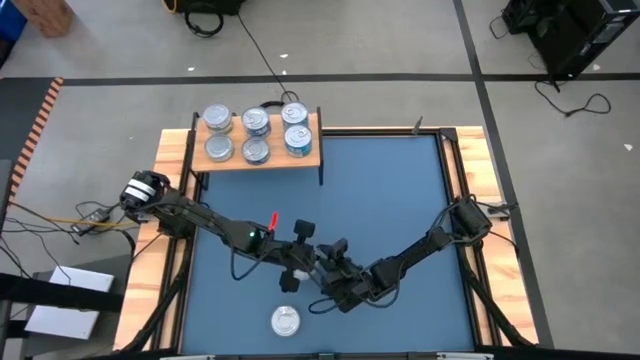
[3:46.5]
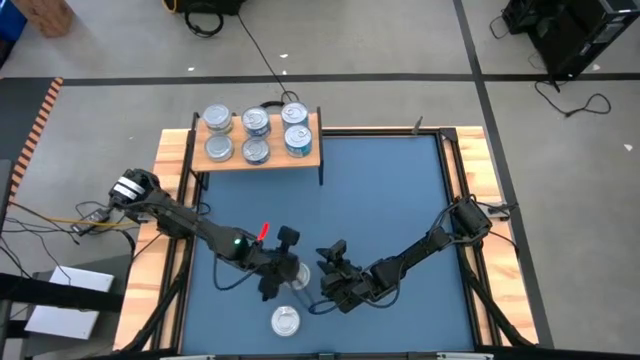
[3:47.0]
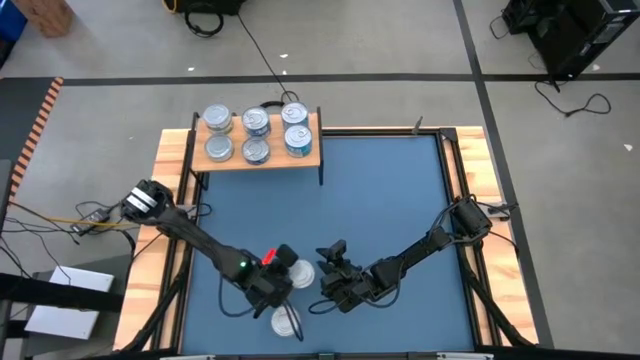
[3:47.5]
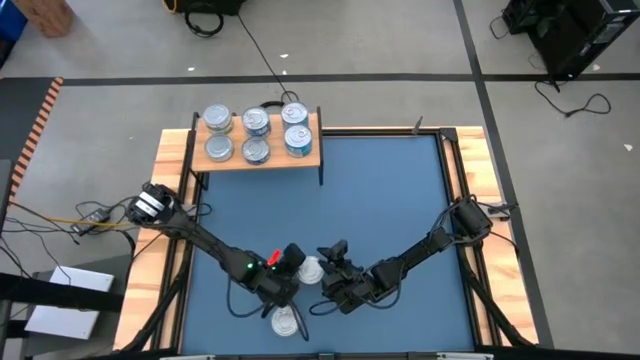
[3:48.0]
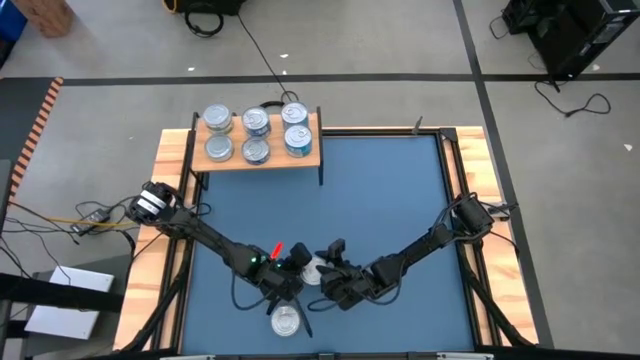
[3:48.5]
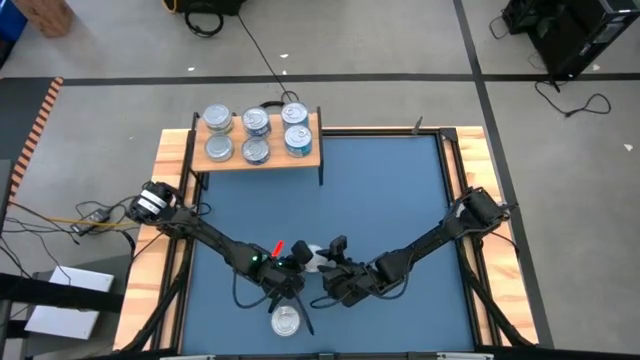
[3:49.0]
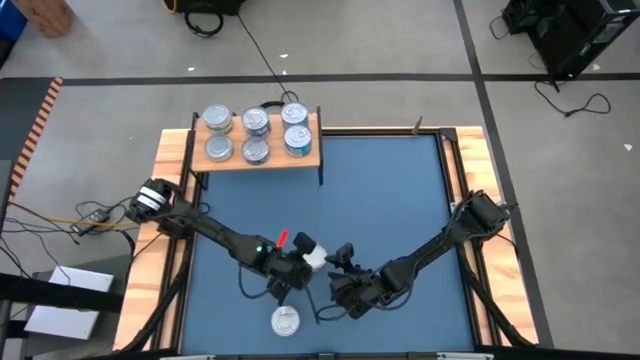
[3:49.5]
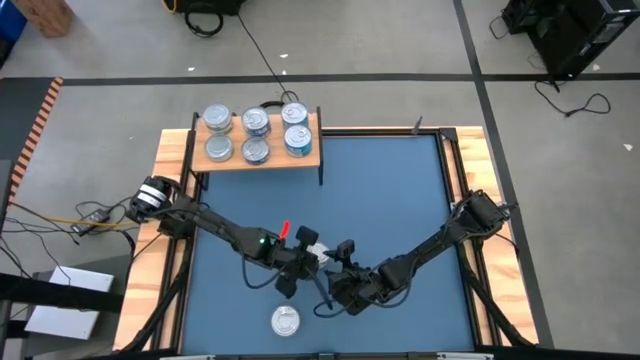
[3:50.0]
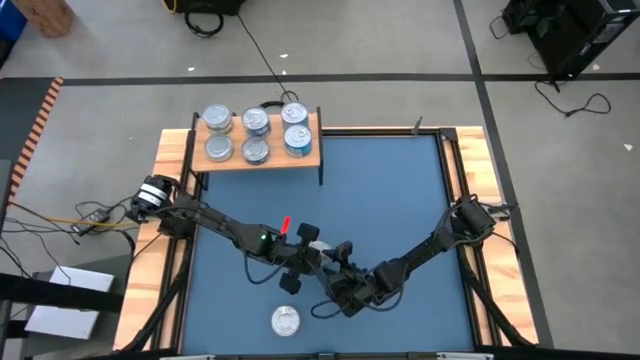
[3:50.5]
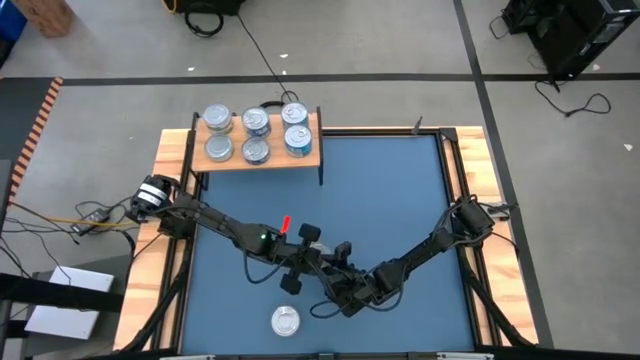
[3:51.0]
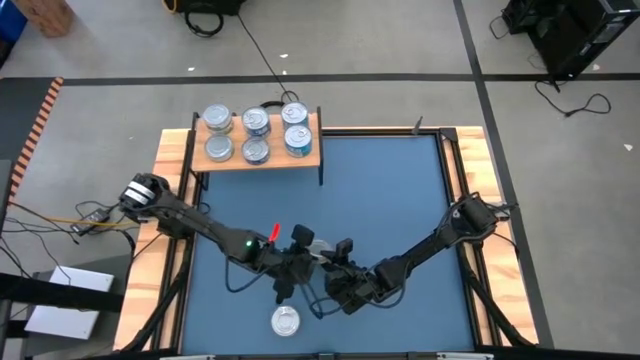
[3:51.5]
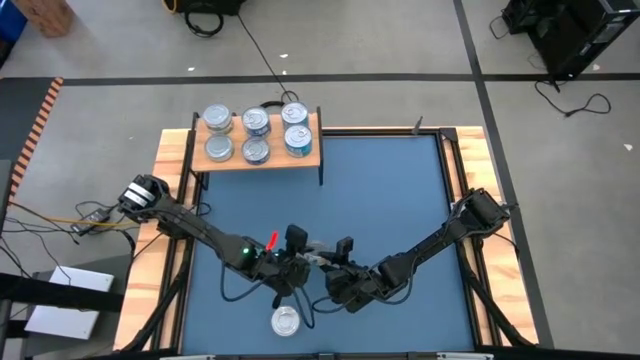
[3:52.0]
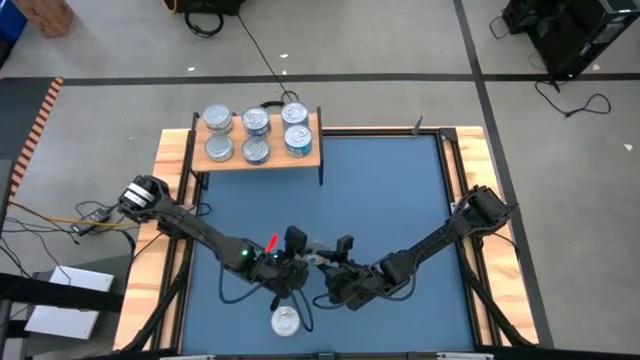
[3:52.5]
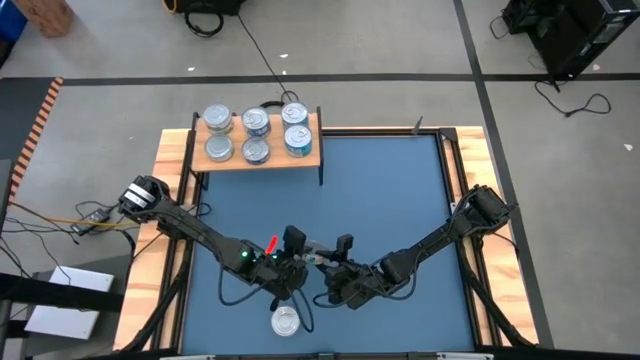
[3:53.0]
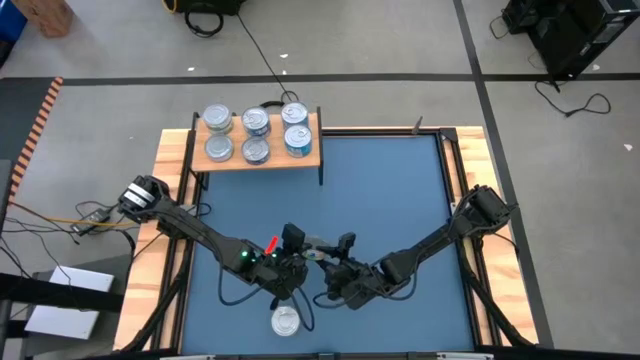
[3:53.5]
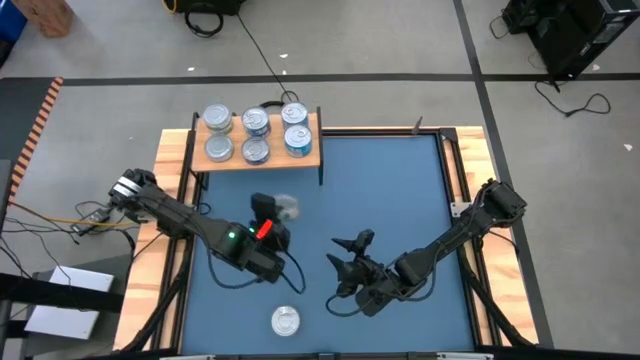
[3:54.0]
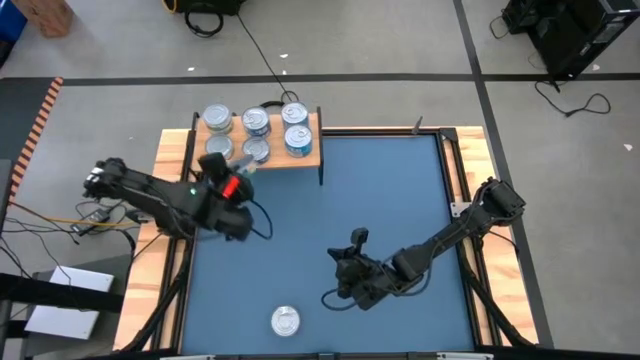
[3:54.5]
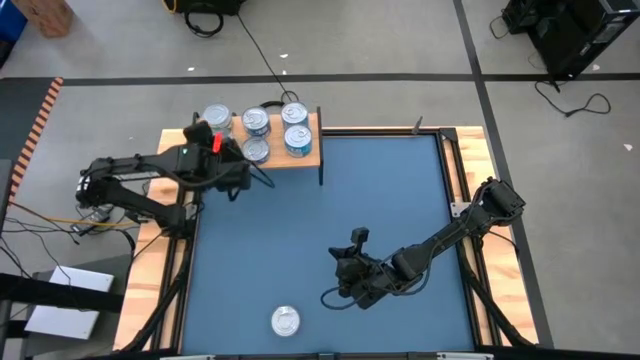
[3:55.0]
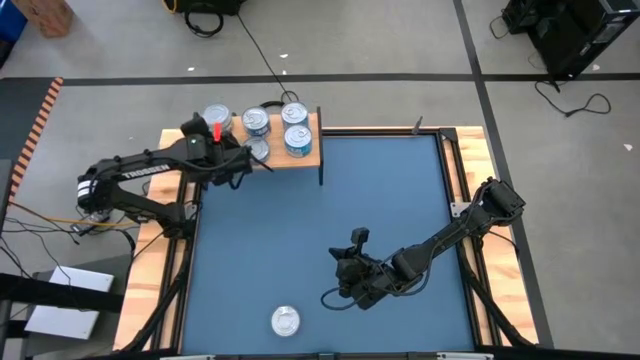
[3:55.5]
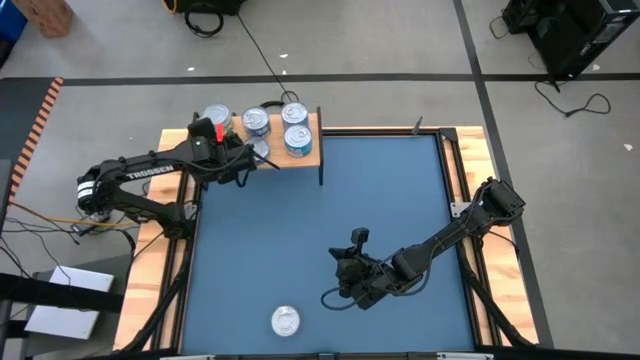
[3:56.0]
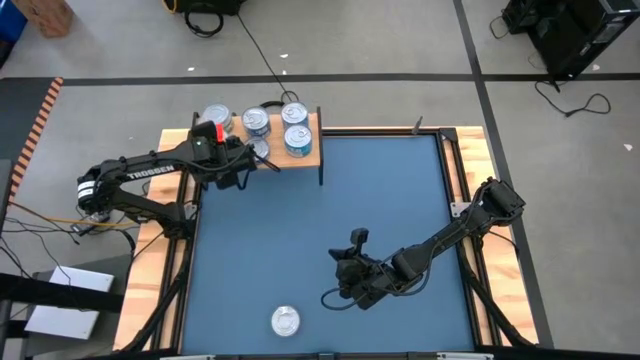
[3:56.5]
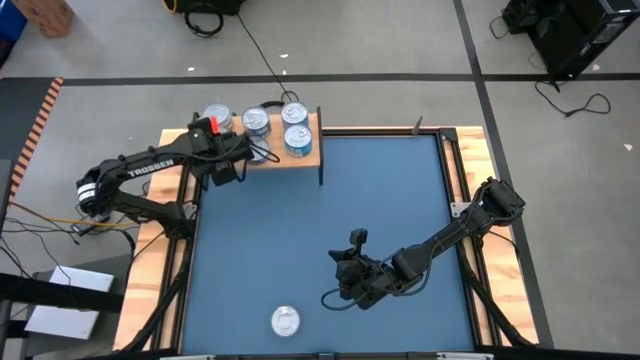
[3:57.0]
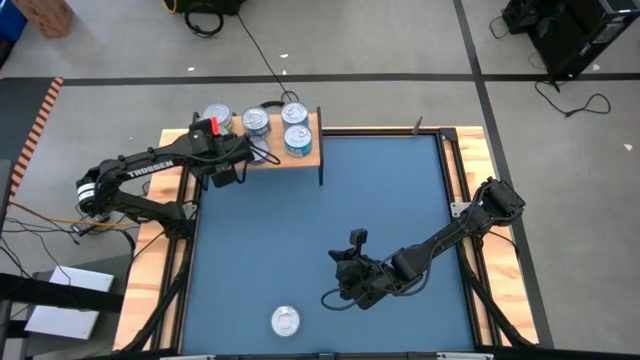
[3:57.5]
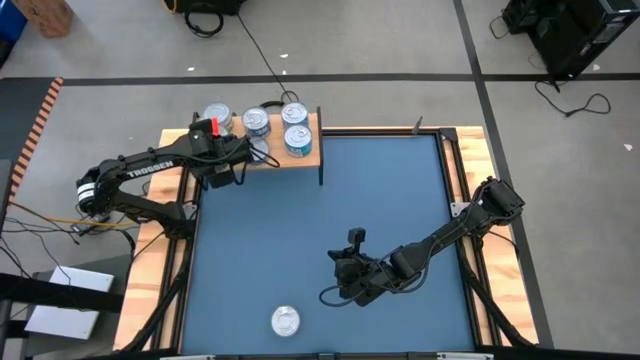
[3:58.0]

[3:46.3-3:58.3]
Task: Stack canned seafood by type on shelf
Stack the green white tuna can on top of the green white tuna can on the shelf

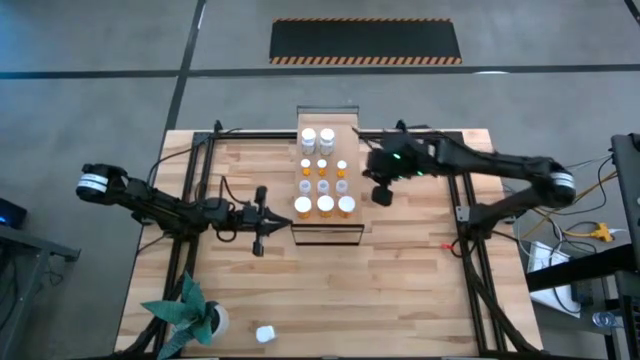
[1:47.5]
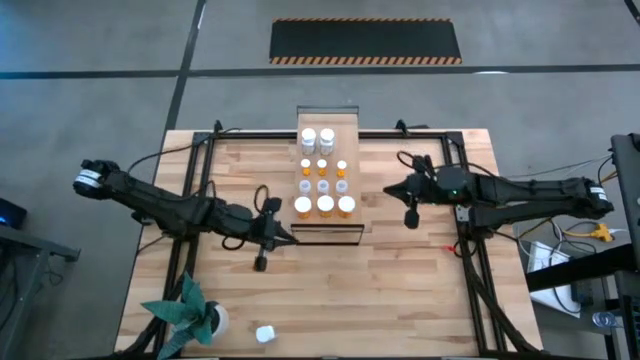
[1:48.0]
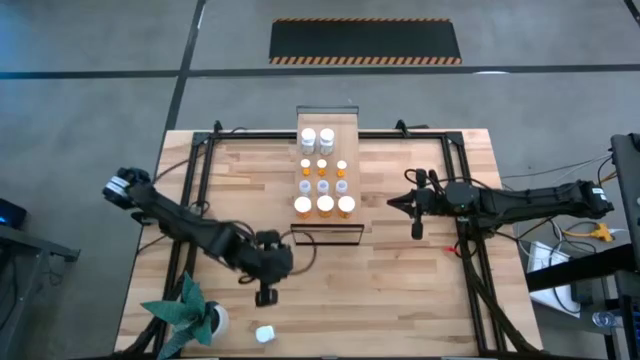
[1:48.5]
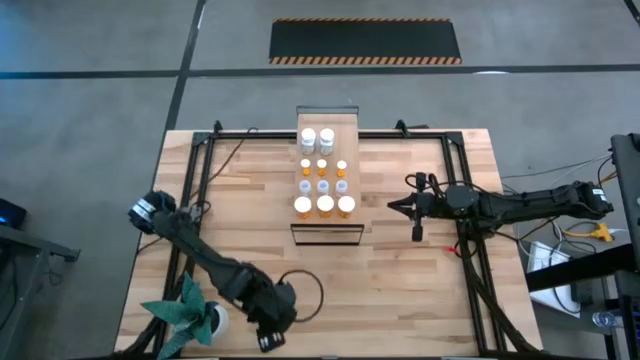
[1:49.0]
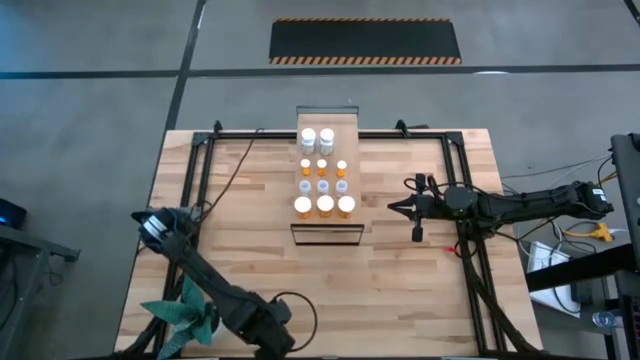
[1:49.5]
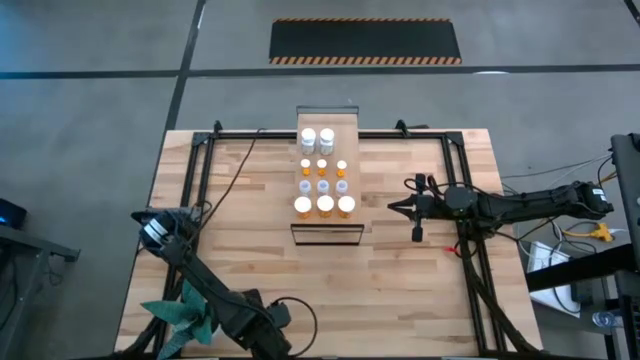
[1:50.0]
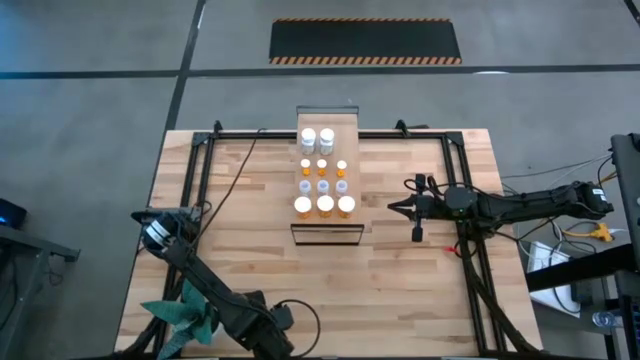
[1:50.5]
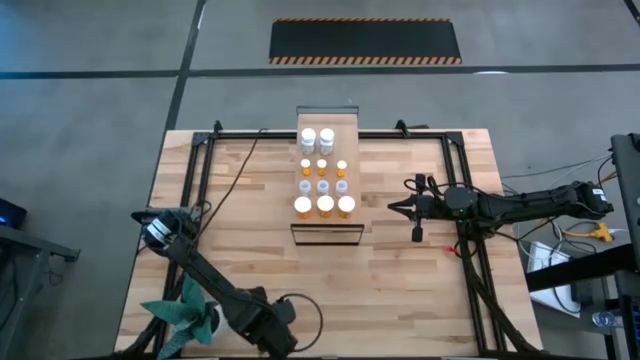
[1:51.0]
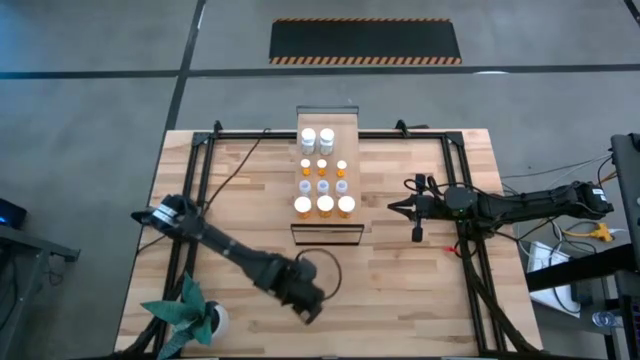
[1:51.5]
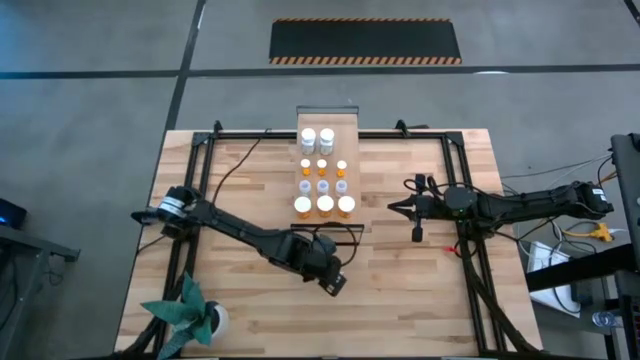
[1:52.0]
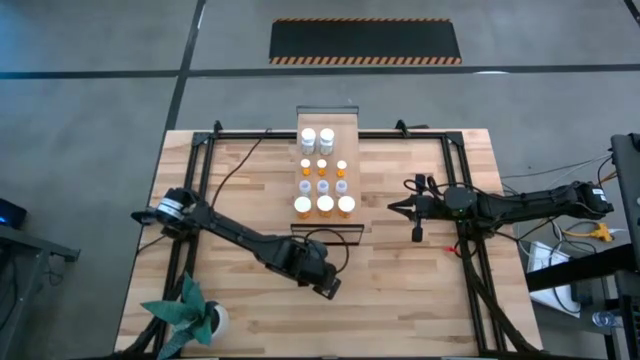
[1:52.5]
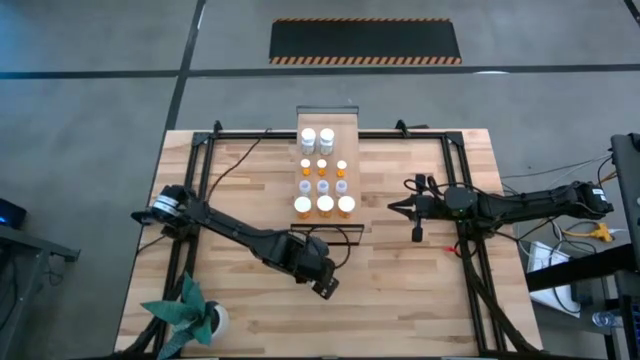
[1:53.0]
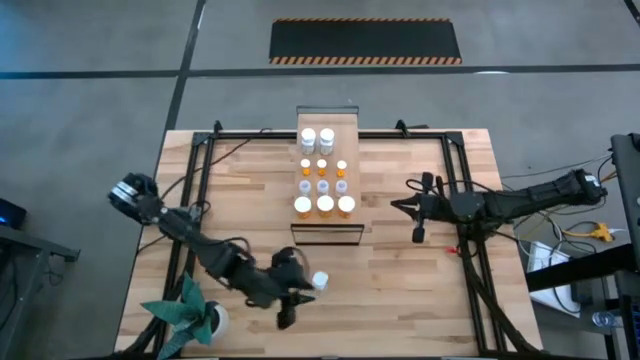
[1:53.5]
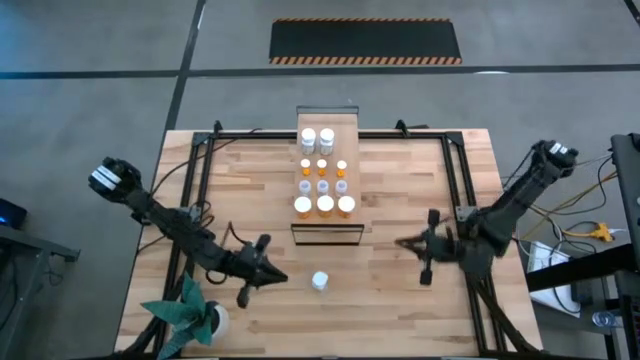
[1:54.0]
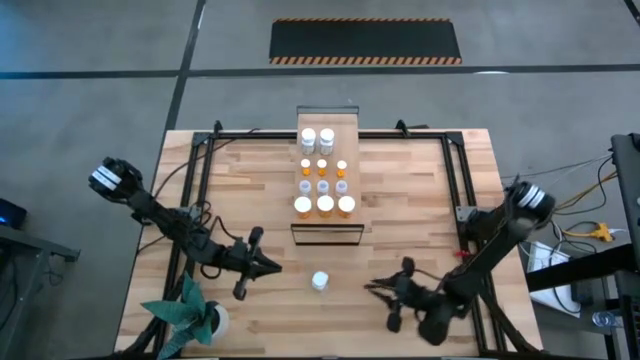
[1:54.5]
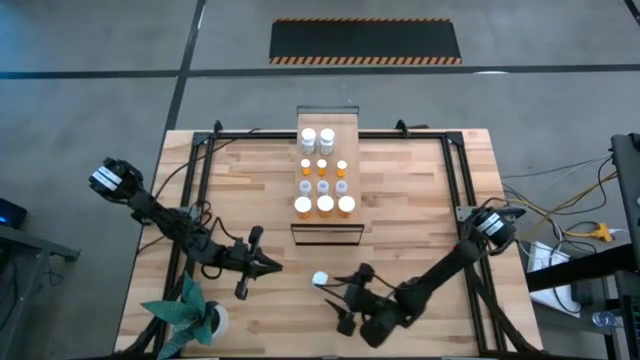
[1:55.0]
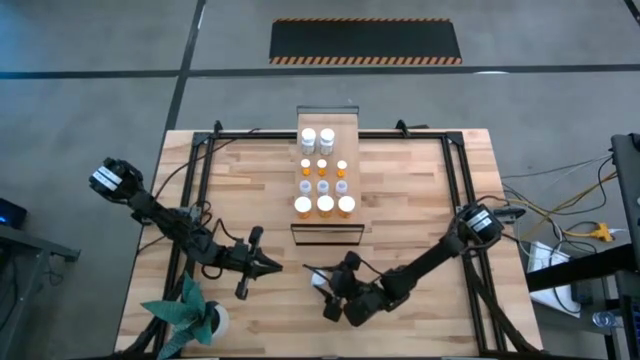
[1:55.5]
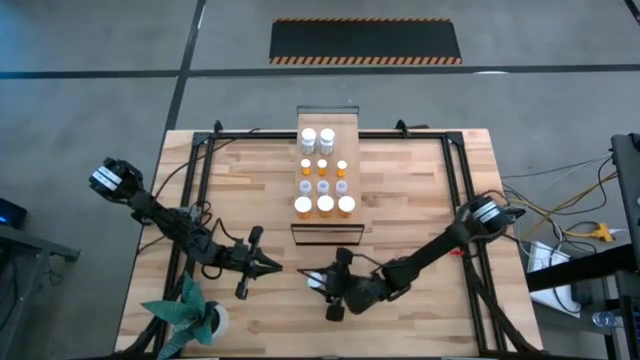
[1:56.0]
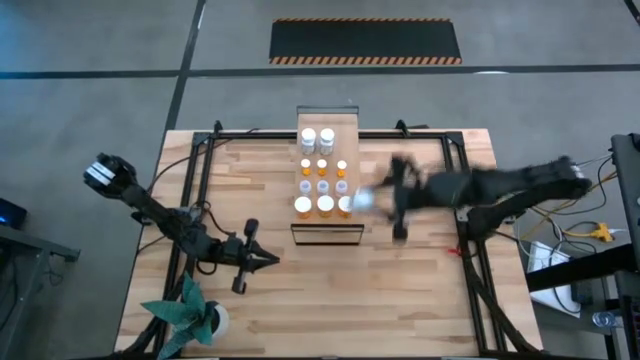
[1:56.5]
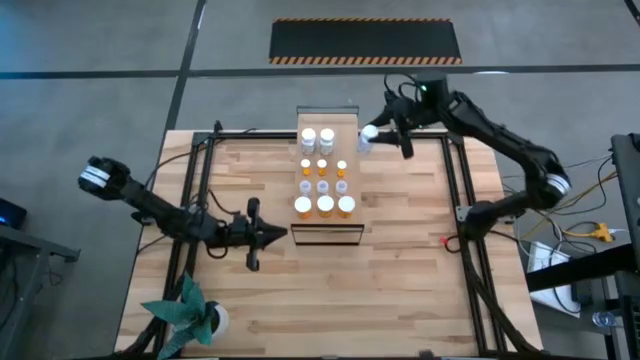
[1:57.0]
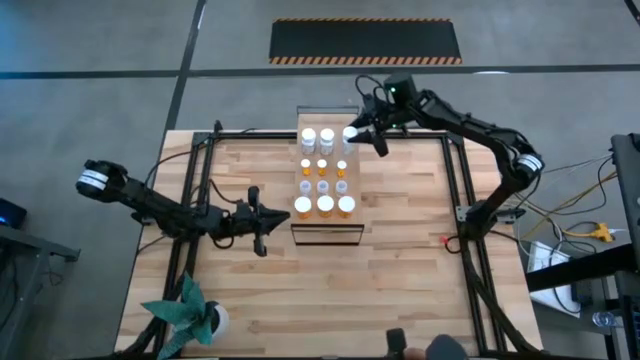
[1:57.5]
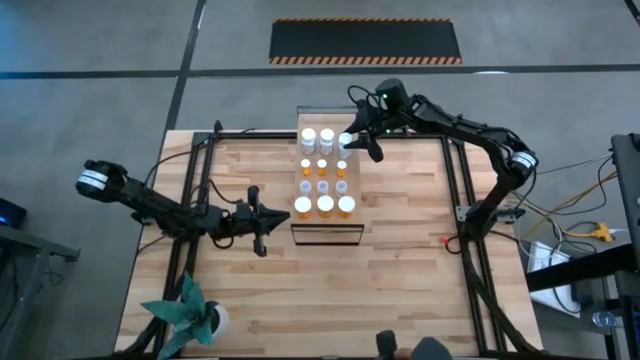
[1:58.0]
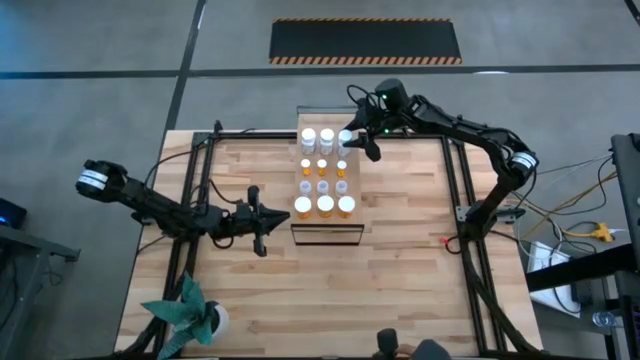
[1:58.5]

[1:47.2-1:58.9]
Task: Pick and place medicine bottles onto shelf by color
Put the white pill bottle aligned with the other white pill bottles on the shelf
